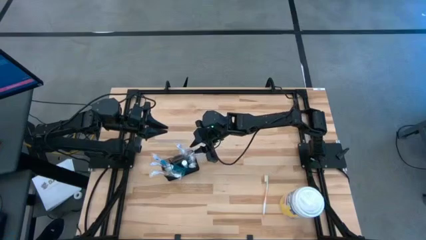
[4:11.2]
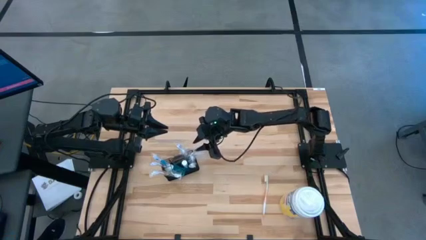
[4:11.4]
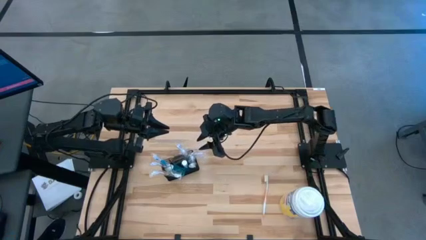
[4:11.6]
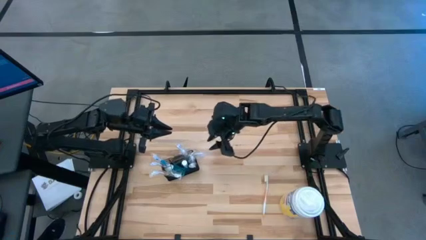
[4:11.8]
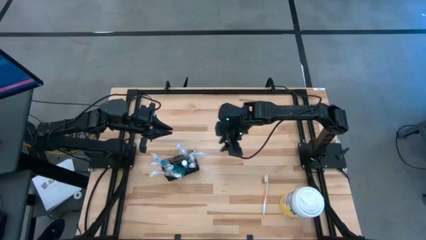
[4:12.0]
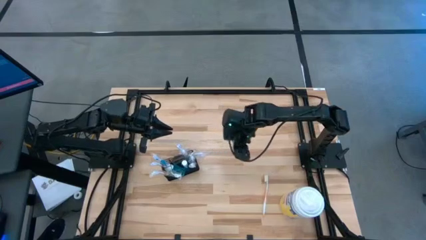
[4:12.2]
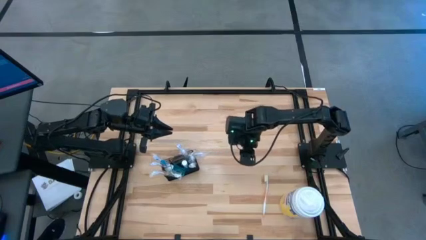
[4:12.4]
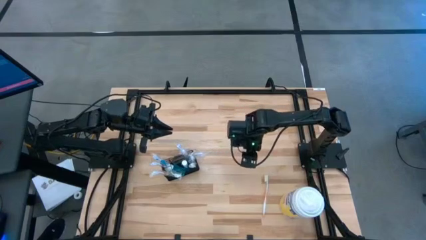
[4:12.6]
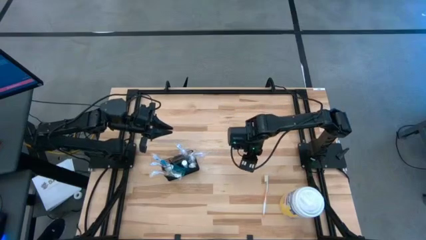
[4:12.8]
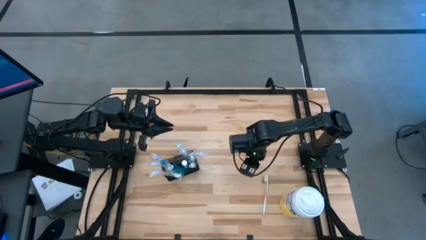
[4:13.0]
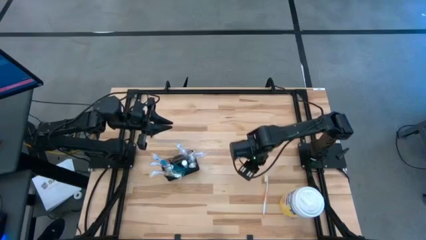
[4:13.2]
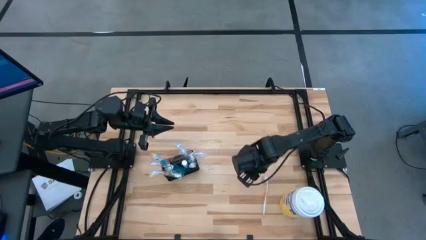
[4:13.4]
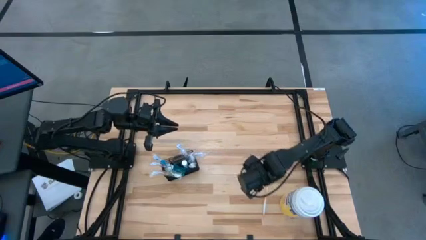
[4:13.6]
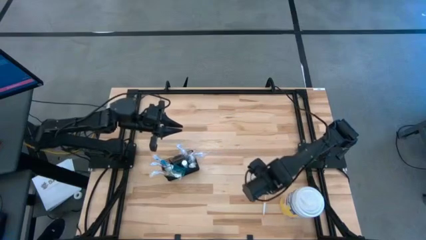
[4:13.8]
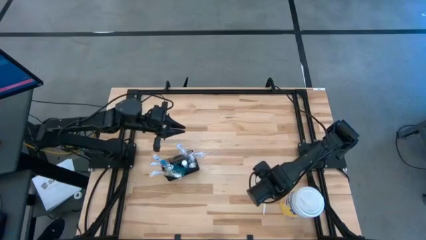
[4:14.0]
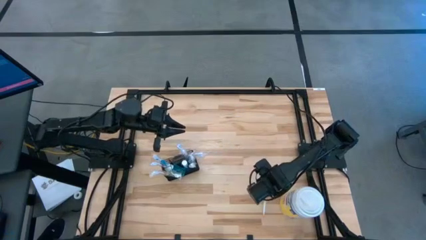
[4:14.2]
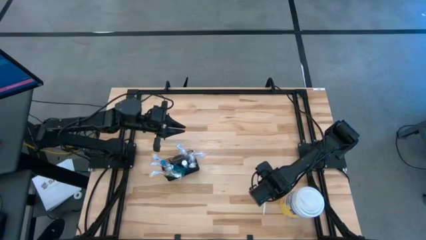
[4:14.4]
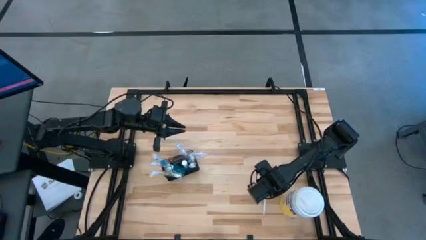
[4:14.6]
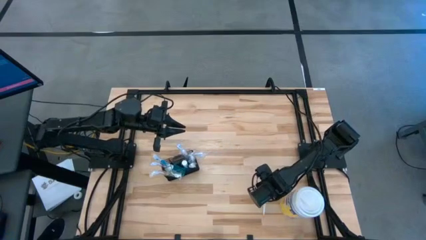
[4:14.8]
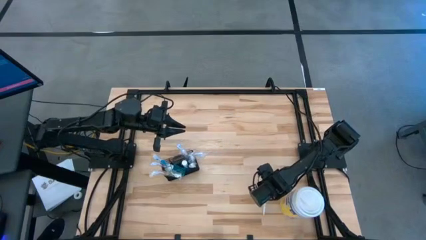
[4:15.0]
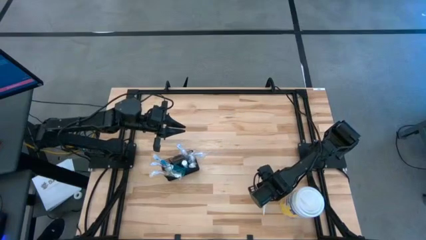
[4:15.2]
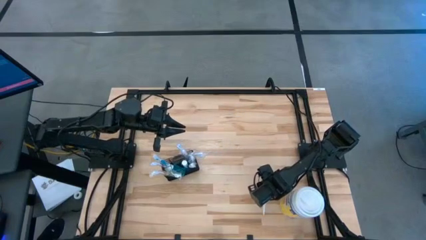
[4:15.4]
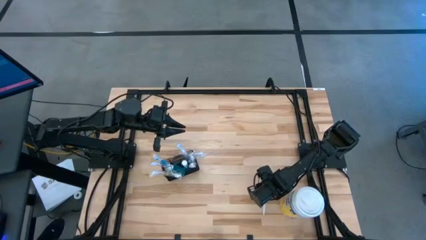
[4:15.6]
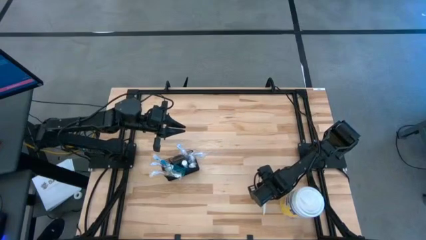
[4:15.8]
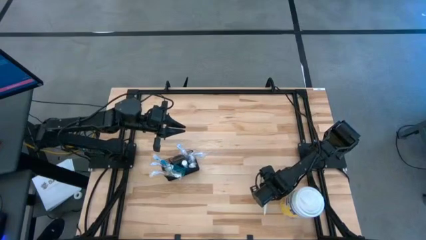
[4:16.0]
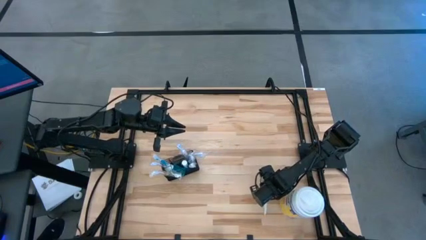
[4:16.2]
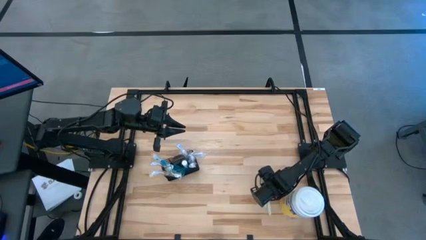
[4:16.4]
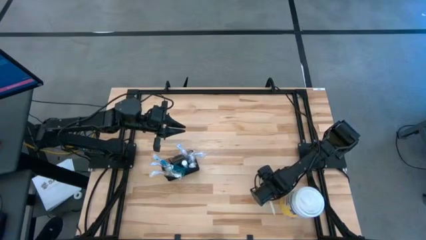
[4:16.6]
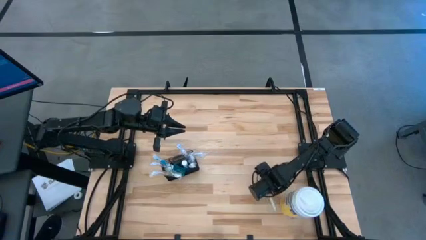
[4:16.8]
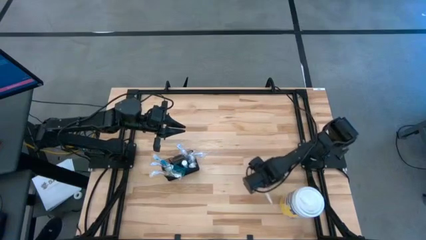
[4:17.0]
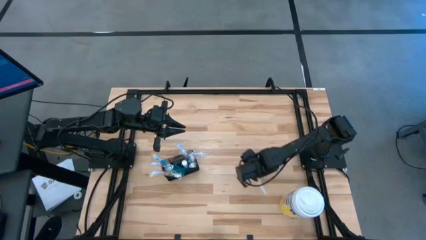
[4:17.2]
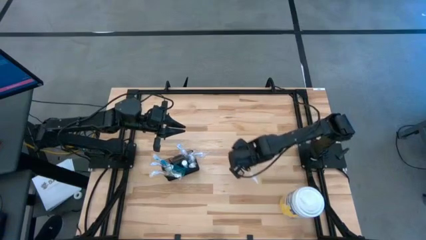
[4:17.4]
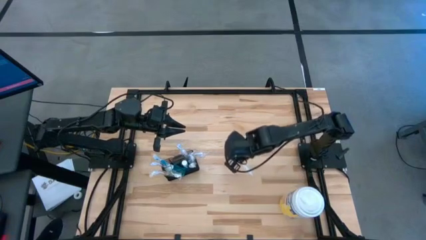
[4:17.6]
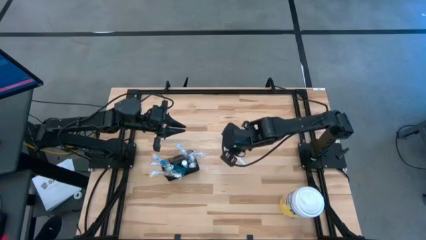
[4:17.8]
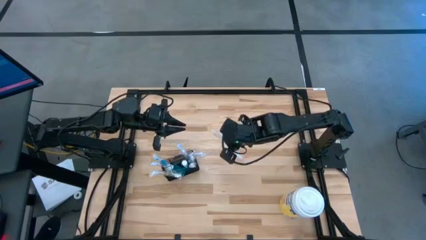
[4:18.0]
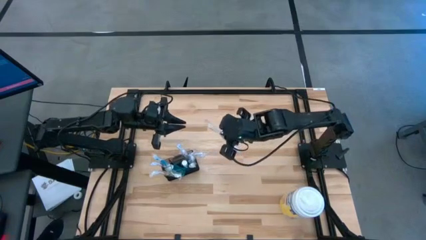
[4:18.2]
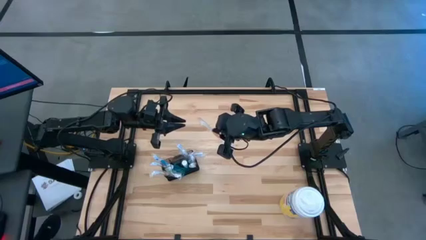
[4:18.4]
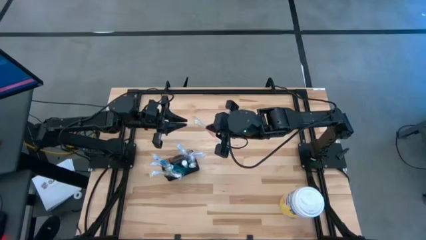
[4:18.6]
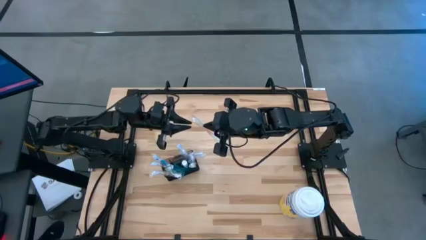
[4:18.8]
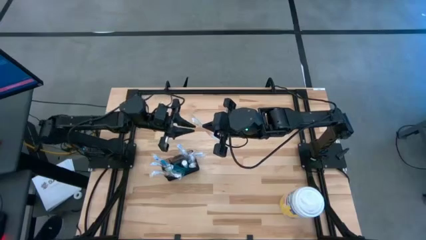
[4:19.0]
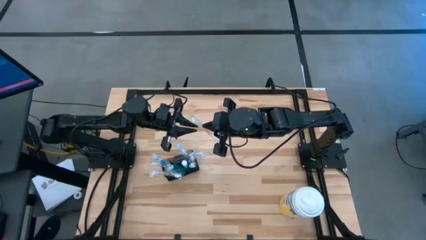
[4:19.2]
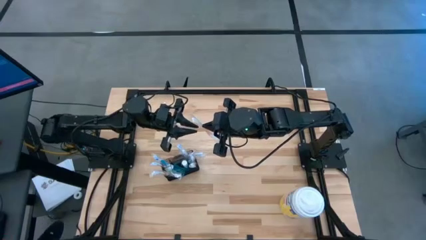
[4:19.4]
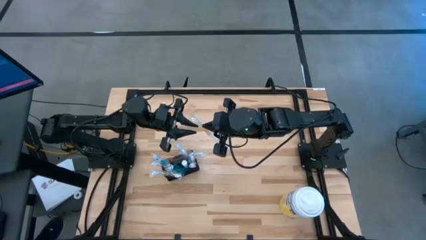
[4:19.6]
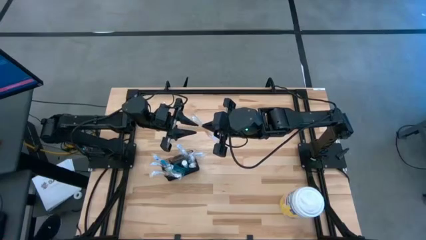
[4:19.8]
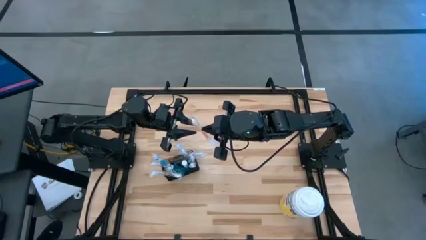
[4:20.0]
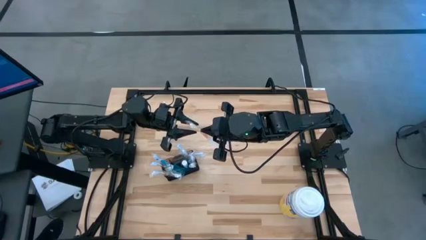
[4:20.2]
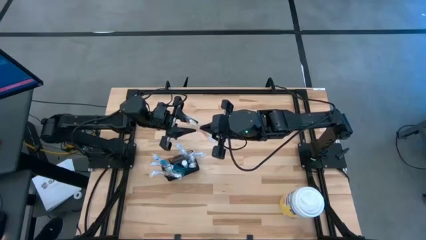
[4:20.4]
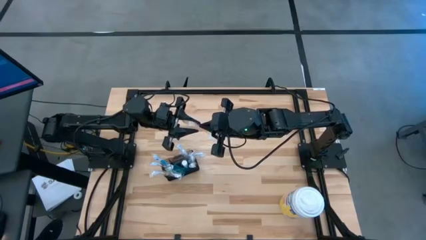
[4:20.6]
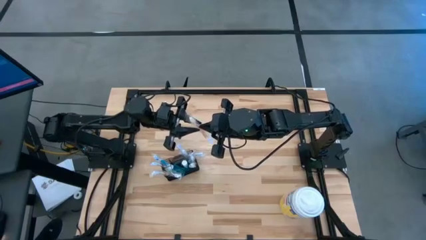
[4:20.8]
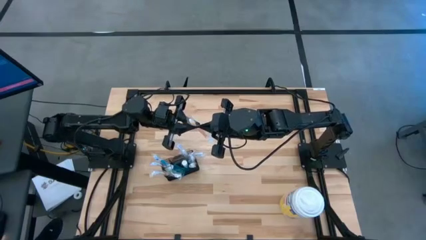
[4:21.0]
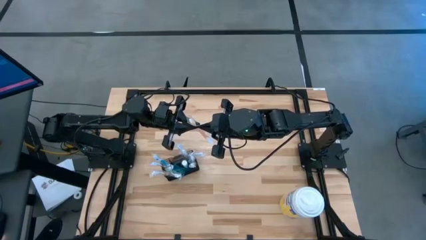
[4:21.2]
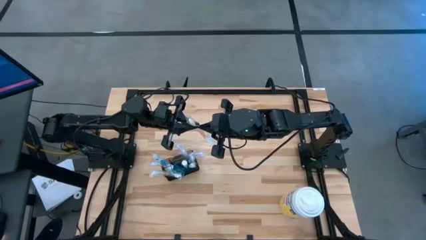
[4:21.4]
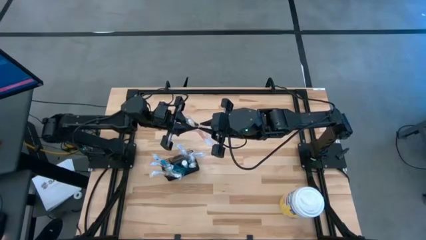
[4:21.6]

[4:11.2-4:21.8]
Task: Pick & Place toothbrushing station
Put the orange toothbrush into the top left section of the mesh organizer

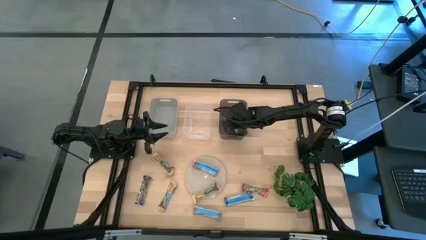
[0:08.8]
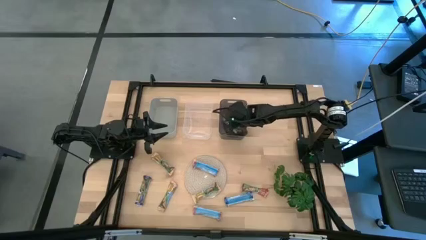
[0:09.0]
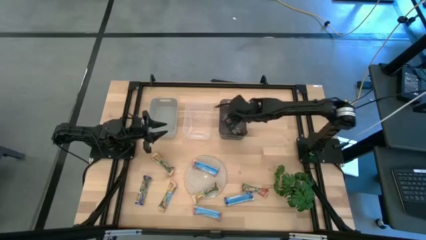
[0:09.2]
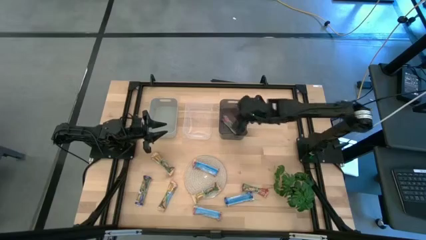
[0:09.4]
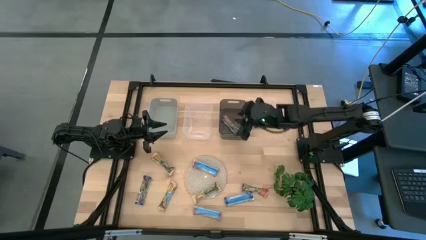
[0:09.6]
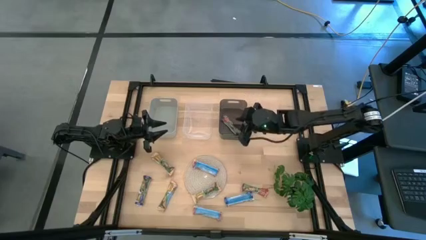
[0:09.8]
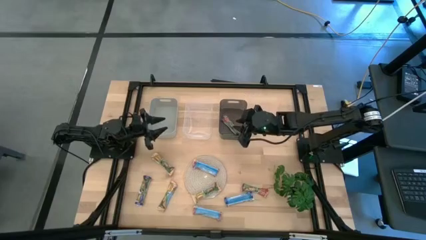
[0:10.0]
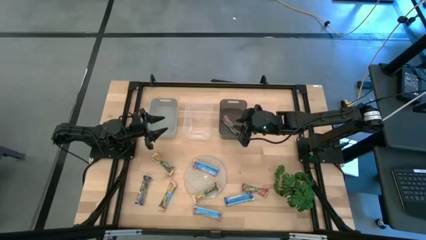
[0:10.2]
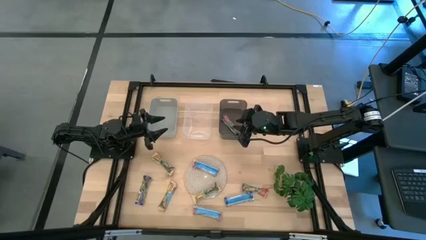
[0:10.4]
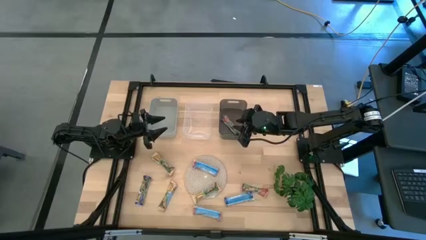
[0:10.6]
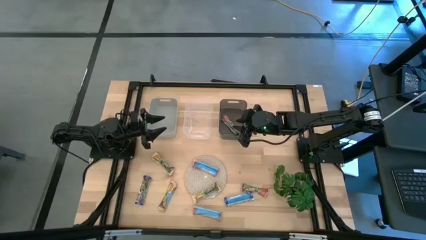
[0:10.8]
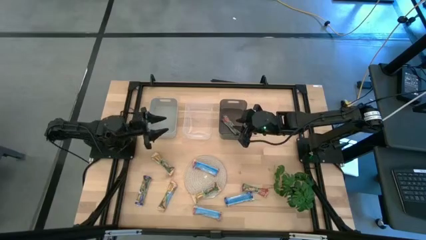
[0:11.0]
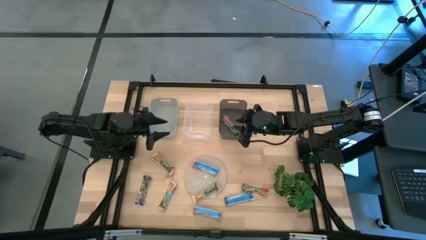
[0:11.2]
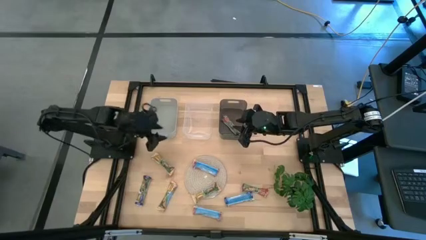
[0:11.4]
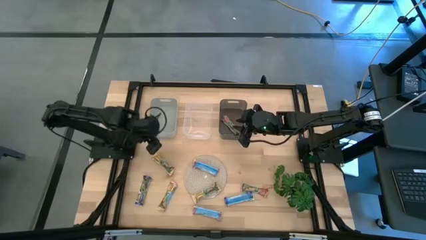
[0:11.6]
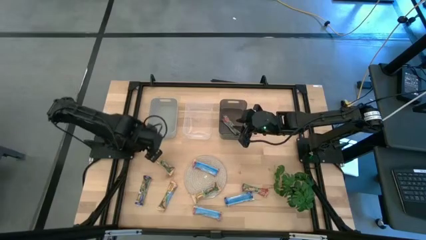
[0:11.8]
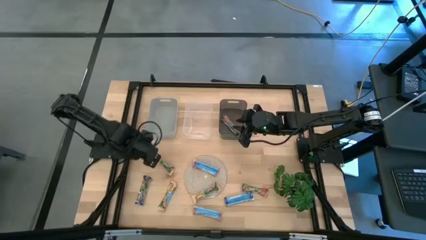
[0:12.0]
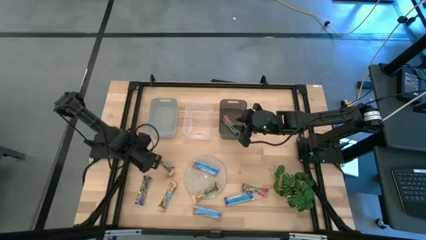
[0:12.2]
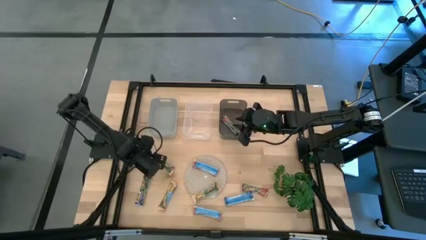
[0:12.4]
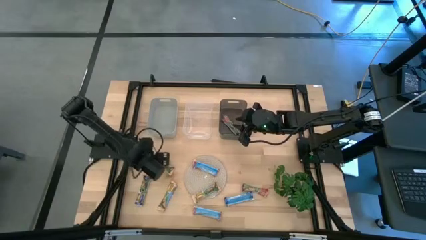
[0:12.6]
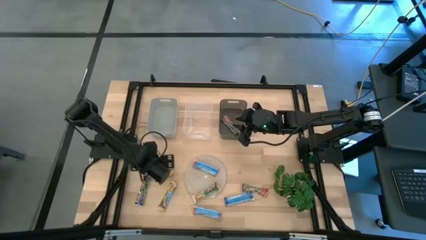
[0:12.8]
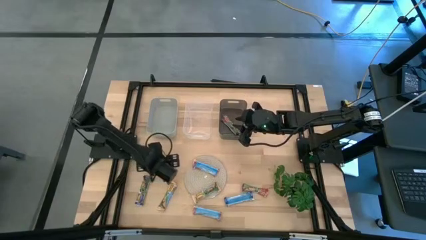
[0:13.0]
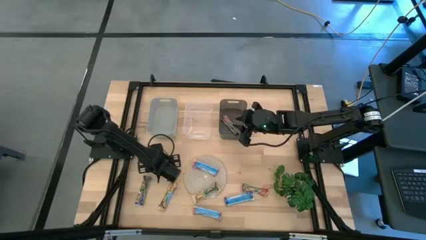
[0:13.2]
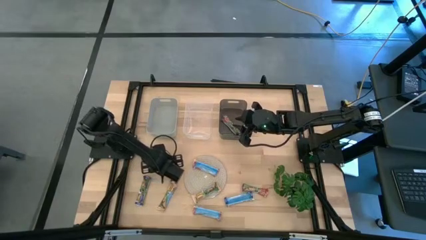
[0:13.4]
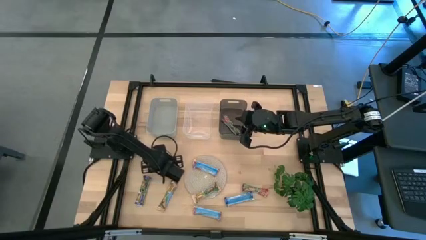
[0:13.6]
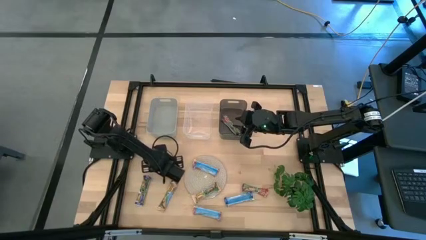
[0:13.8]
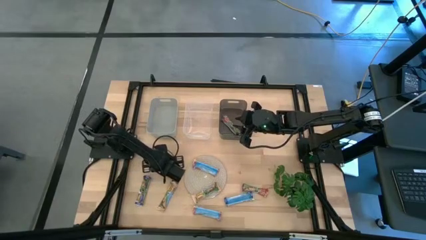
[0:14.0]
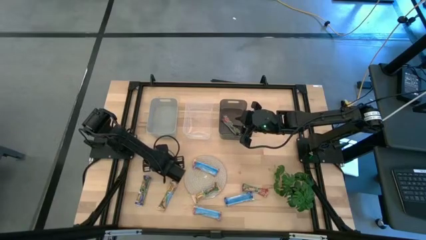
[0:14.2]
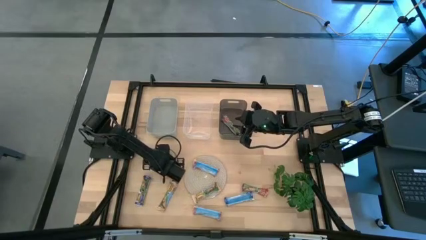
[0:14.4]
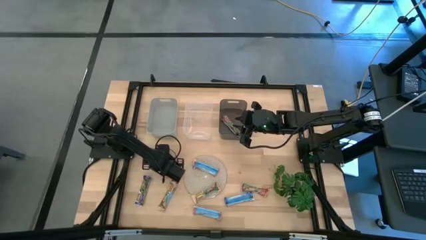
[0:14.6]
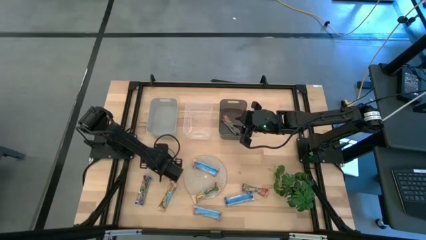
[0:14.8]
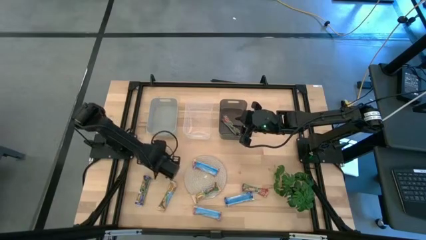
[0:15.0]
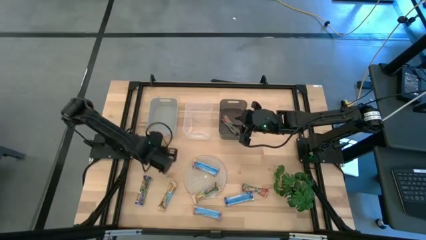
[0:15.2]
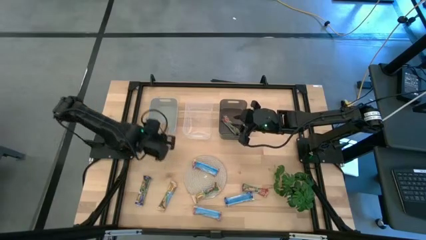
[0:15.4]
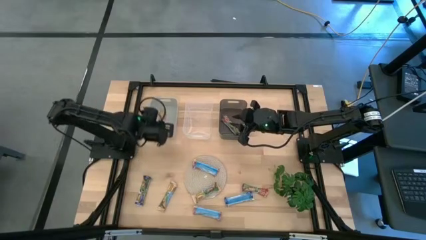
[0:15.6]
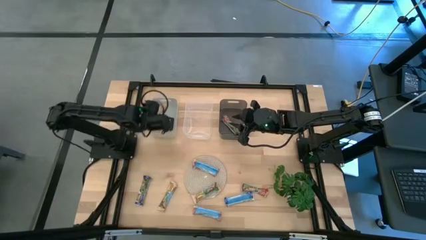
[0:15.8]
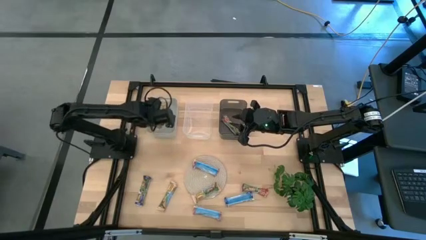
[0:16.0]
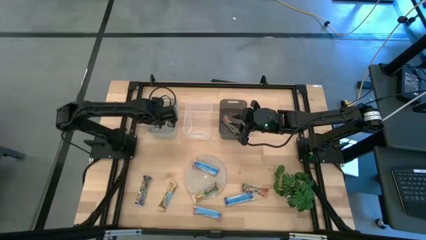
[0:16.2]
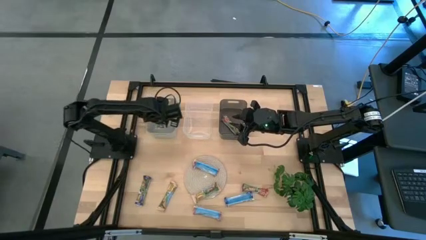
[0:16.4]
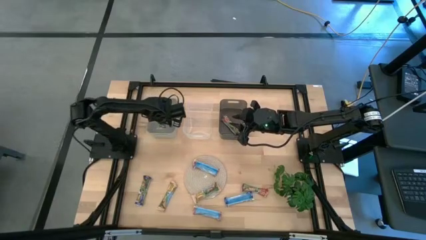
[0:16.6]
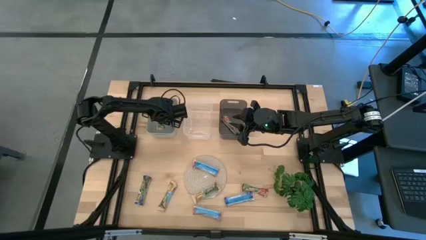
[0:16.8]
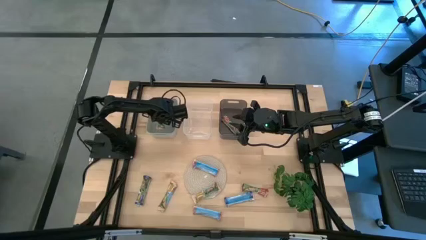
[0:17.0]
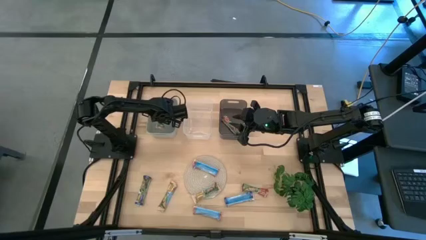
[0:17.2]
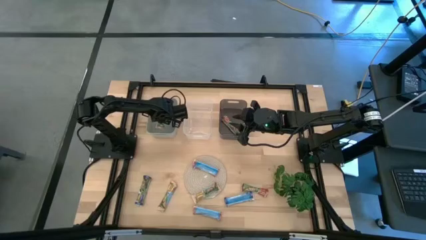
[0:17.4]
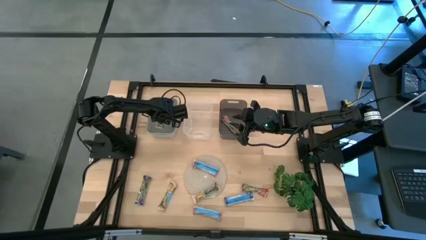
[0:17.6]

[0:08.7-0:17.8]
Task: Pick and place Granola Bars by type
Put the yellow granola bar into the gray bin
